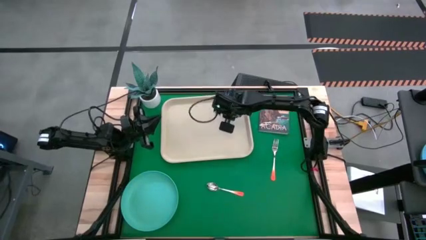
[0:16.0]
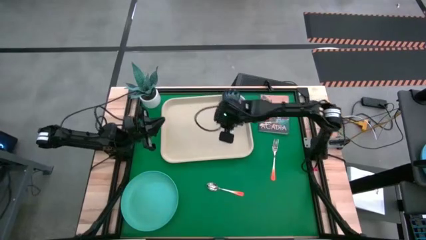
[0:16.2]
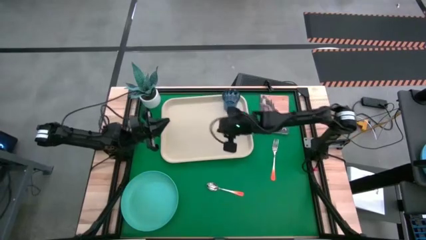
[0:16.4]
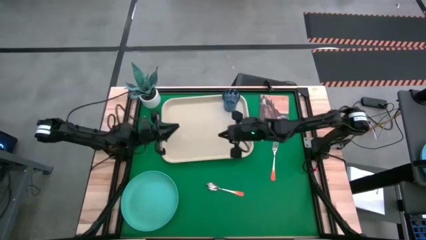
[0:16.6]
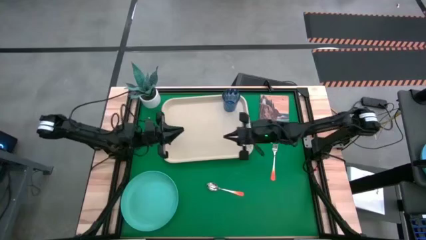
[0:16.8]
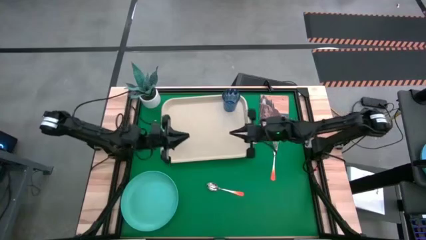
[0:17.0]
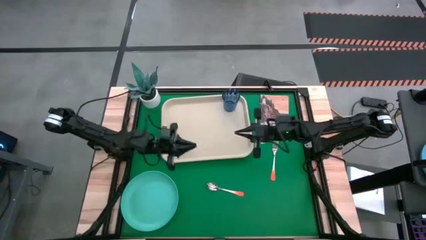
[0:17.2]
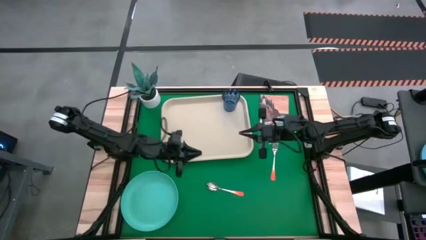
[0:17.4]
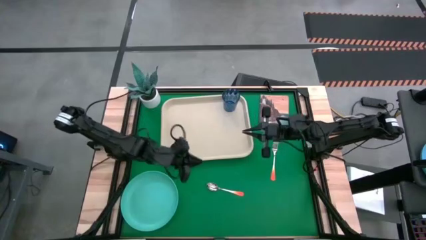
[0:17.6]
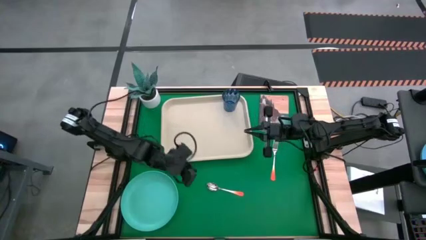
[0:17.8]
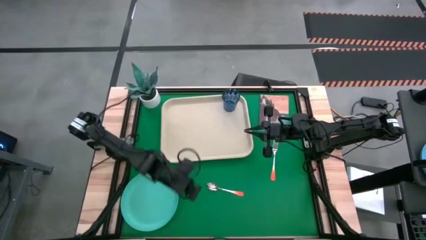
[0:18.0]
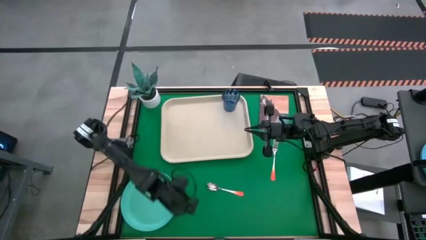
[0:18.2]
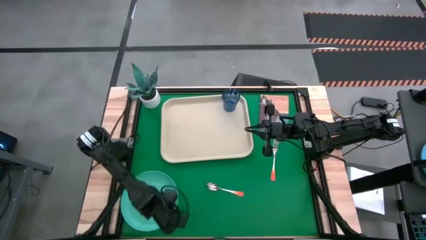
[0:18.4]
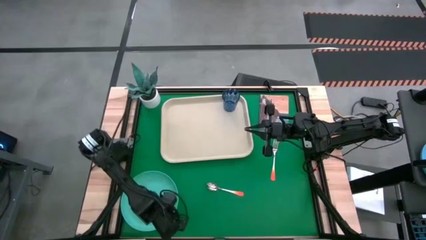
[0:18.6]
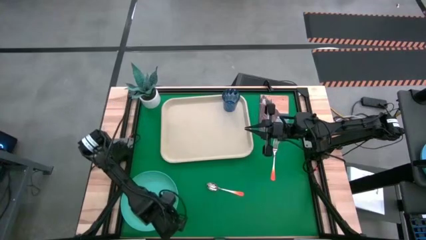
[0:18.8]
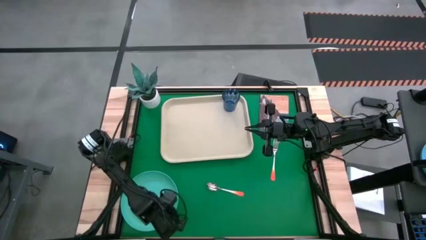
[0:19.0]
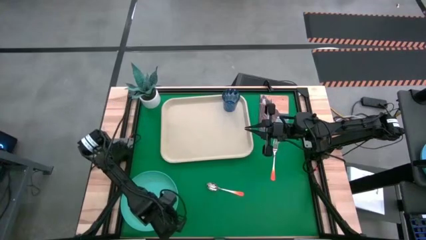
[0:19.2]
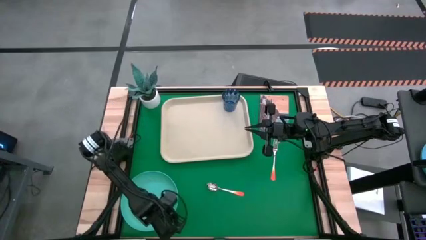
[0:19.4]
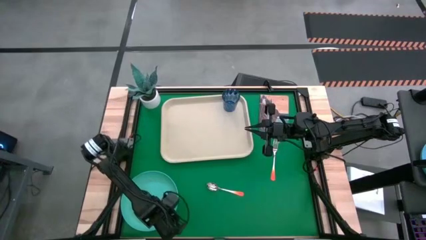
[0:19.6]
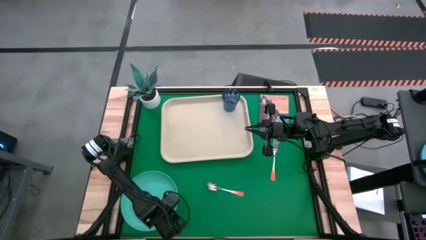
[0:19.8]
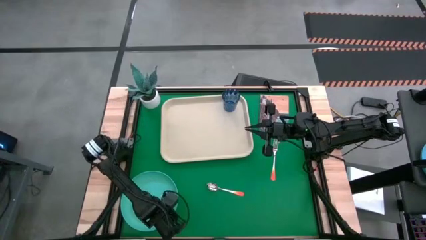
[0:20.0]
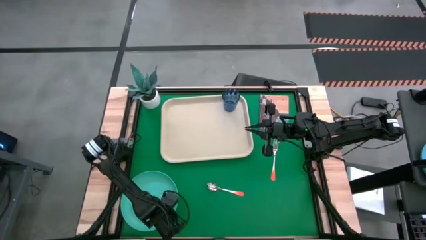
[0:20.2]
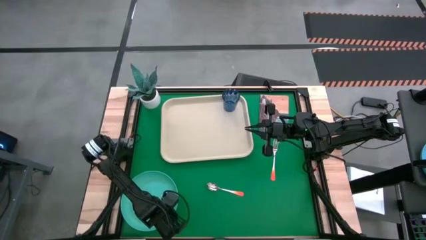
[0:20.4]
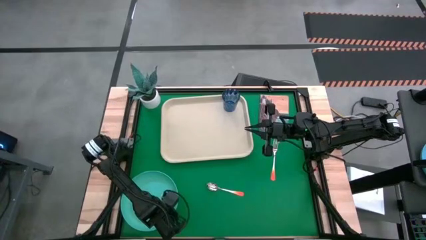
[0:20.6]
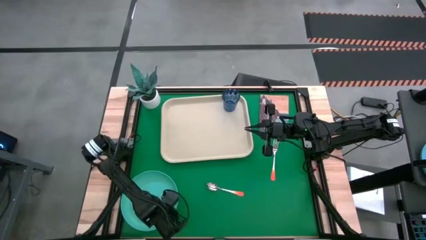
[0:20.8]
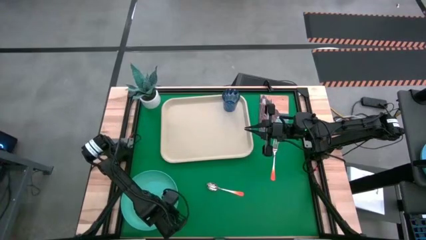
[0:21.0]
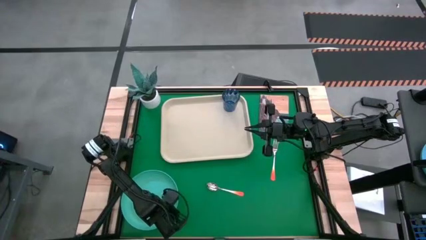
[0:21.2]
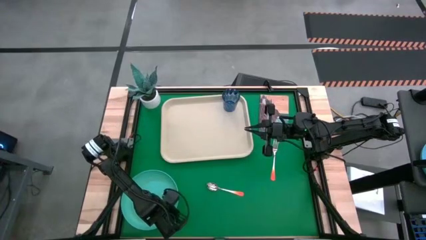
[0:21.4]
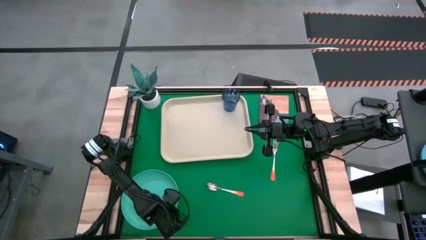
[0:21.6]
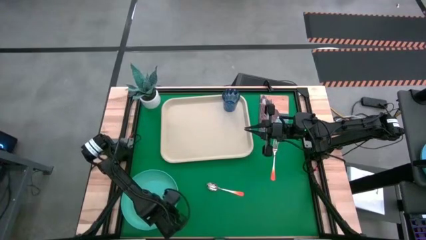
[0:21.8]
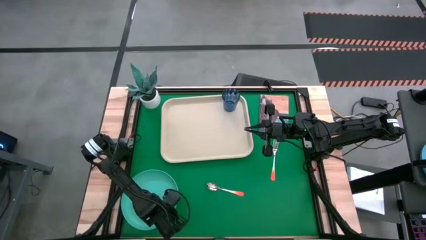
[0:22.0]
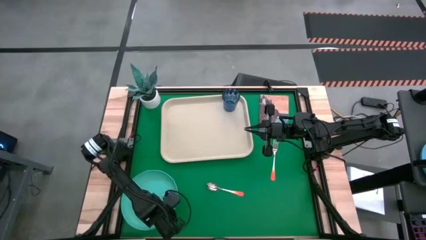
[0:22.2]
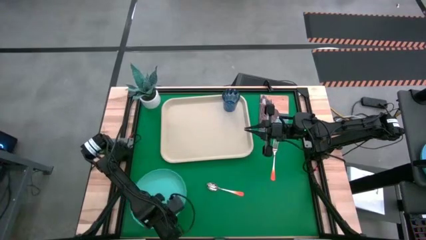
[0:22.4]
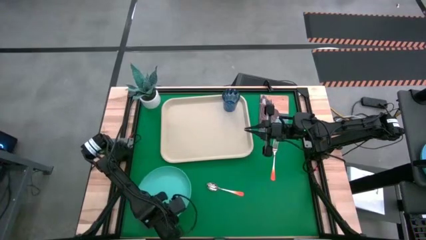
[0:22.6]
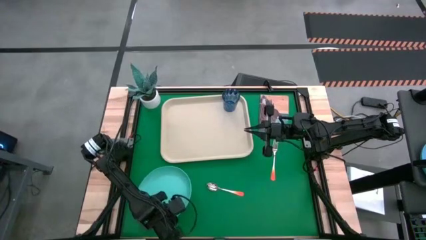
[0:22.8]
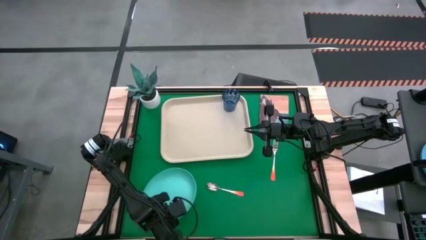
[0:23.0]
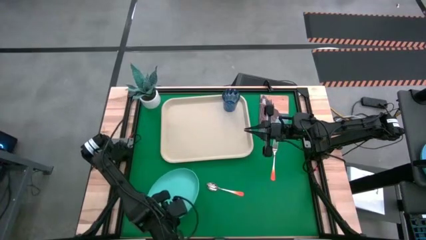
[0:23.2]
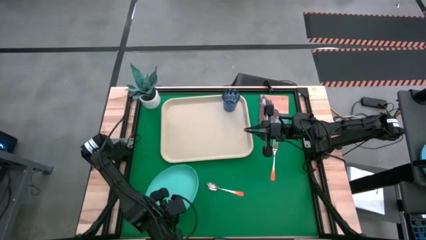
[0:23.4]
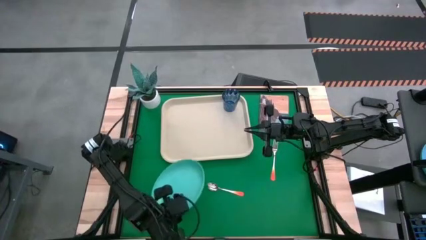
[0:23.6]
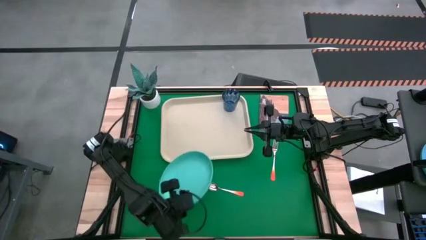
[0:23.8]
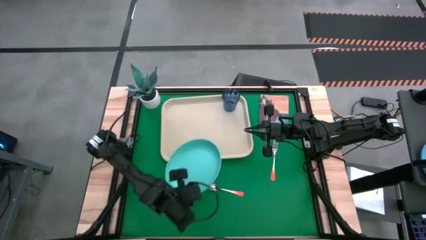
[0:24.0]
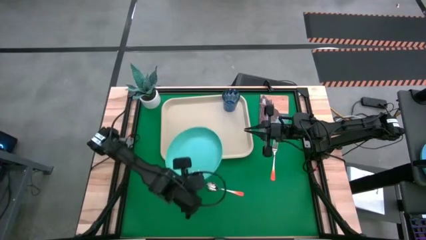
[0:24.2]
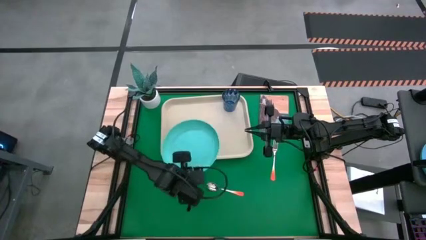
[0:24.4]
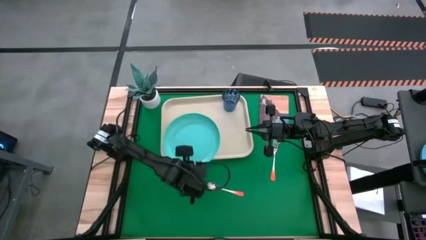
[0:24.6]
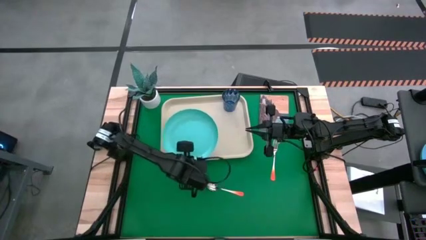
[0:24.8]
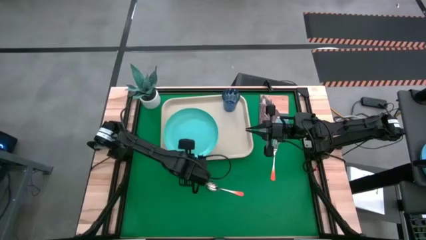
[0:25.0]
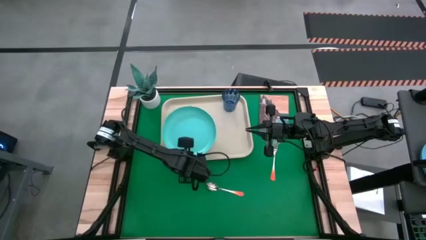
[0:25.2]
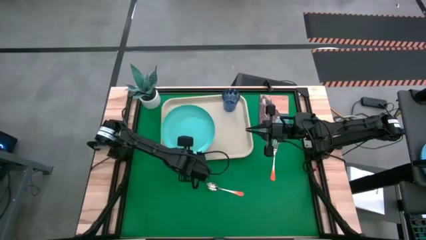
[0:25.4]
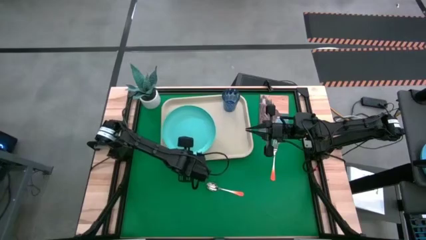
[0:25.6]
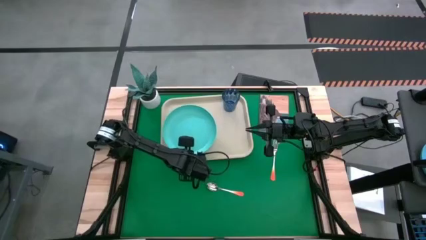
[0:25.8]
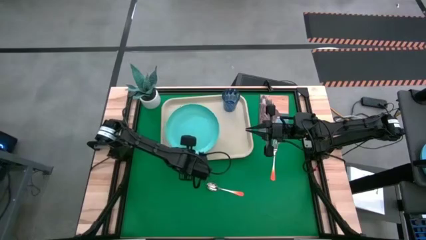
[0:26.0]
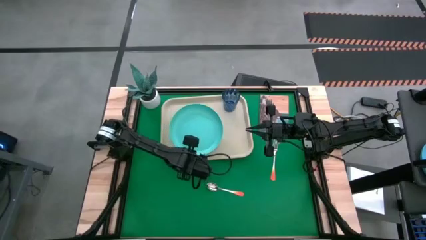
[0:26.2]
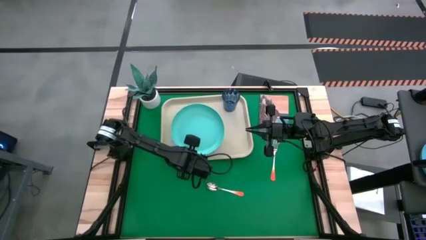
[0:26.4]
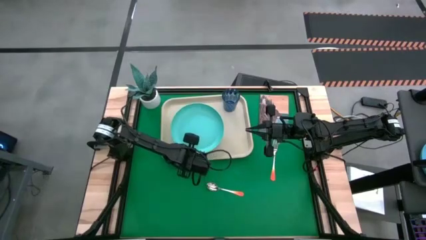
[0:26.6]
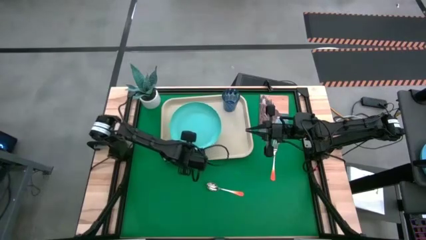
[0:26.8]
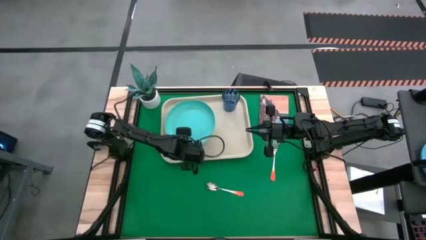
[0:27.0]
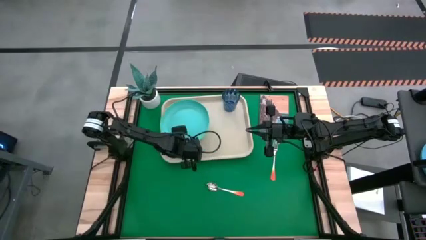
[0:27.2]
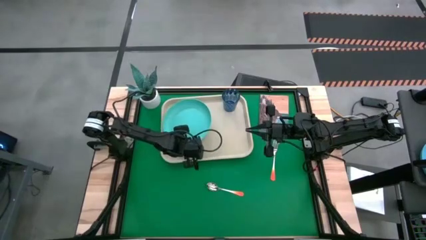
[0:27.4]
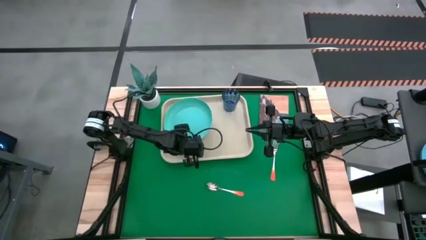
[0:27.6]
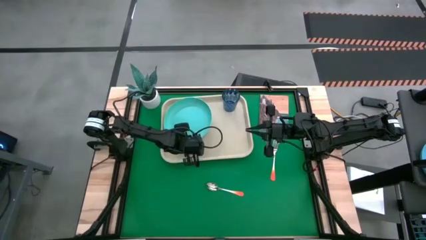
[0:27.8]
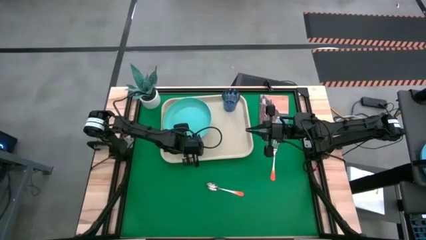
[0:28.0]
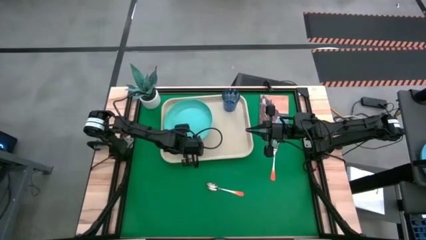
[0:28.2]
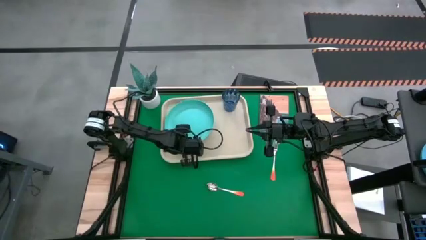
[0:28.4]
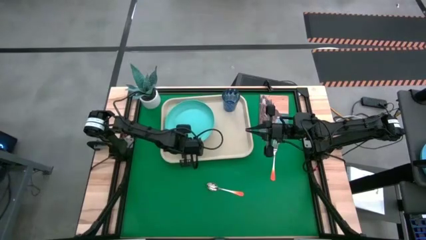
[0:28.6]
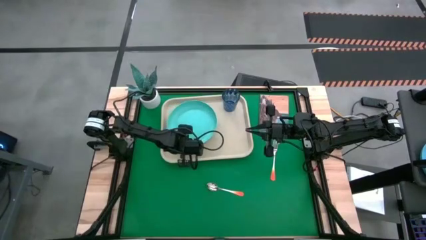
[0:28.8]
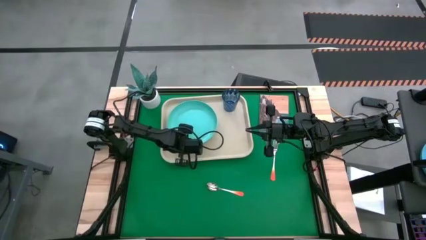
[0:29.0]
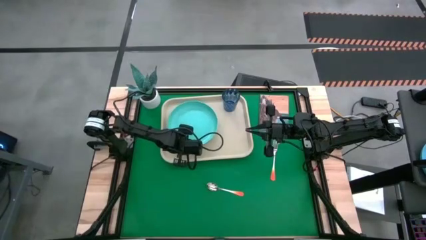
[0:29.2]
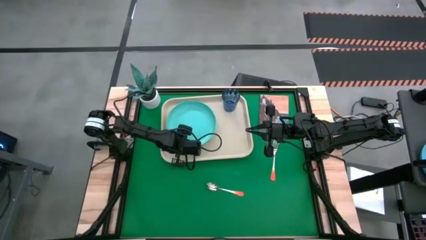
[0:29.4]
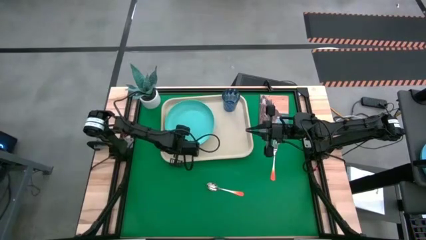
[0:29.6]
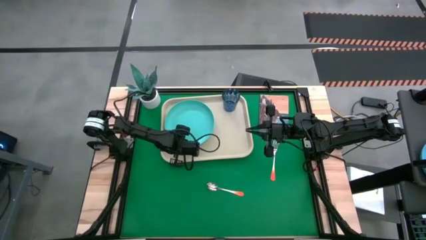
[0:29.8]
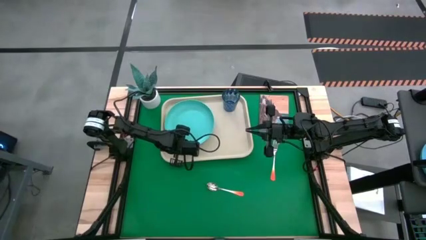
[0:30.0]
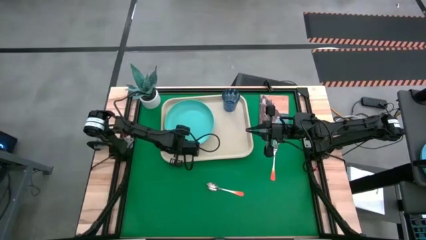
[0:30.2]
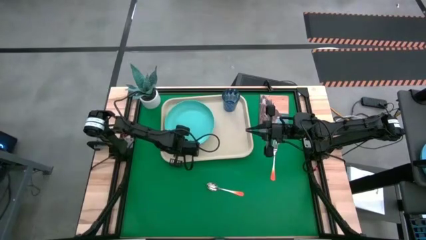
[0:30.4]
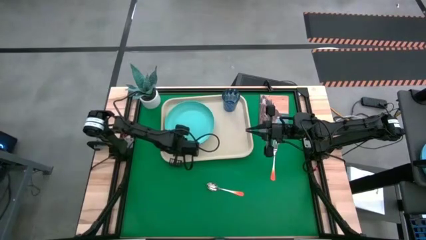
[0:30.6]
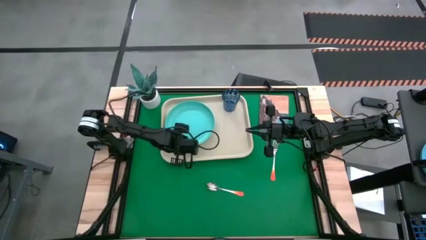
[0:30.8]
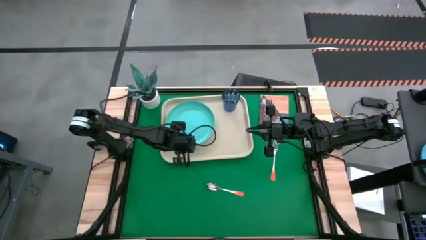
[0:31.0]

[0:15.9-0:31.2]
Task: Pick and place plate/cup/fork/spoon on tray
Put the light blue plate on the light brown serving tray
